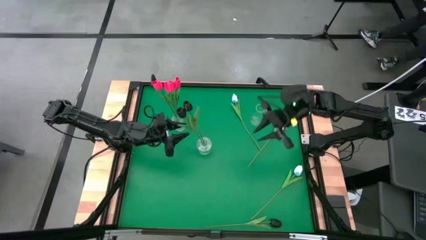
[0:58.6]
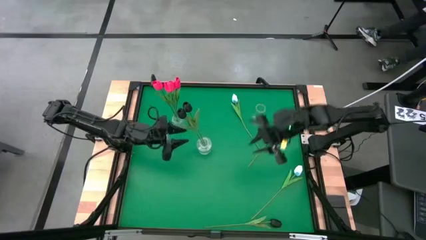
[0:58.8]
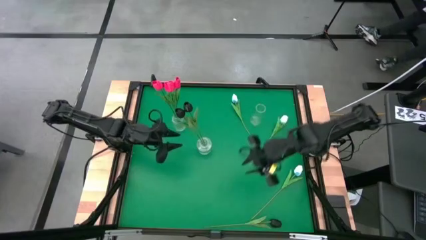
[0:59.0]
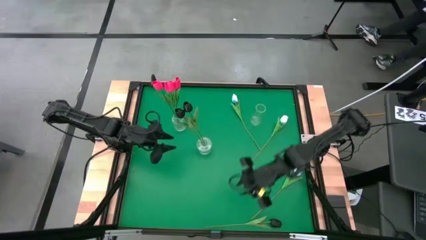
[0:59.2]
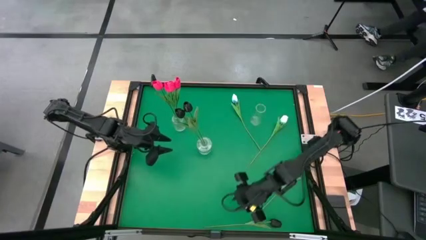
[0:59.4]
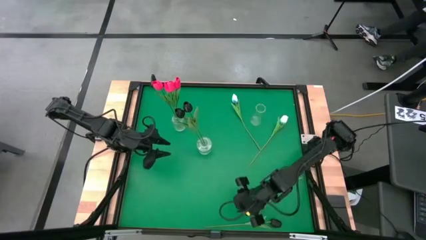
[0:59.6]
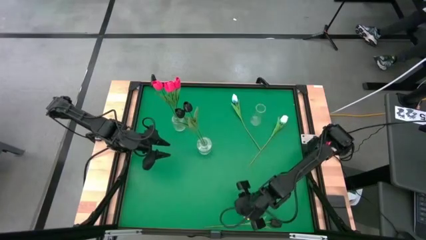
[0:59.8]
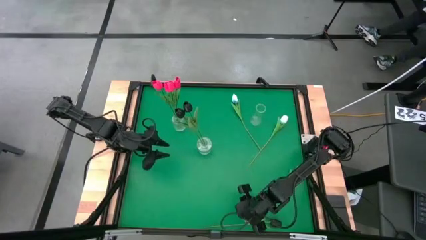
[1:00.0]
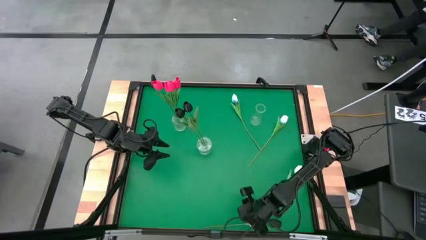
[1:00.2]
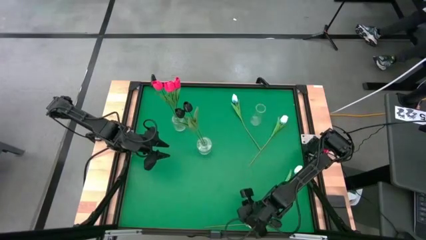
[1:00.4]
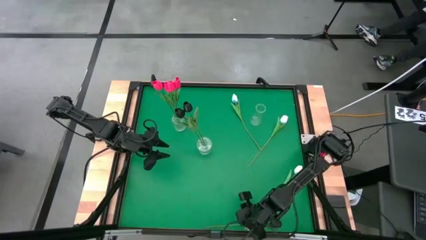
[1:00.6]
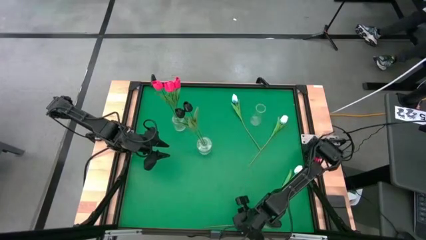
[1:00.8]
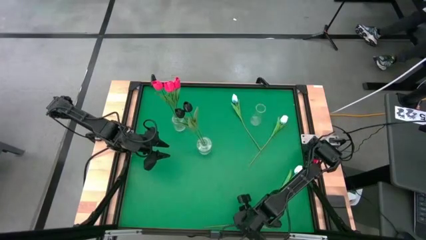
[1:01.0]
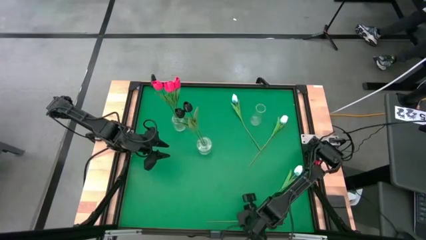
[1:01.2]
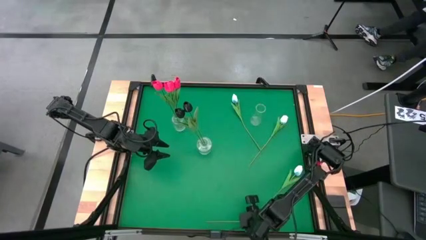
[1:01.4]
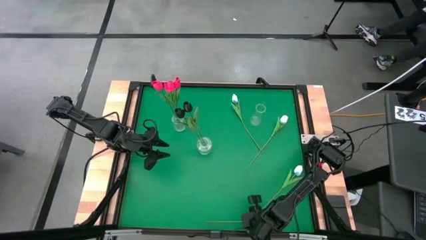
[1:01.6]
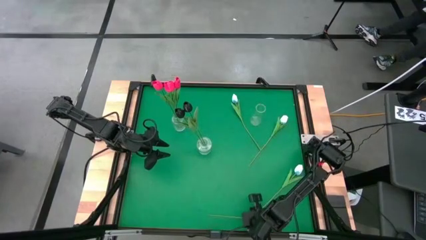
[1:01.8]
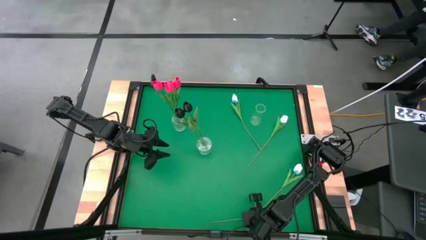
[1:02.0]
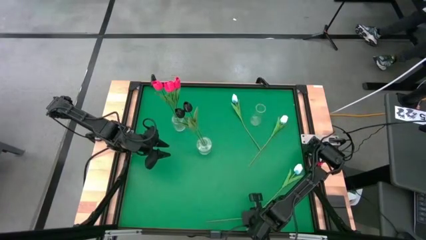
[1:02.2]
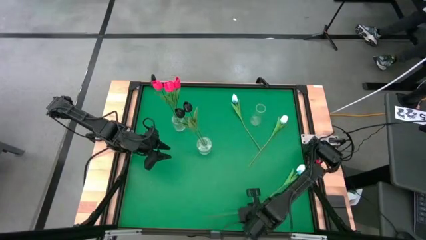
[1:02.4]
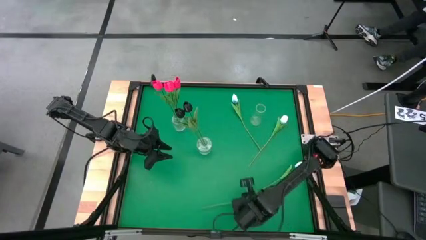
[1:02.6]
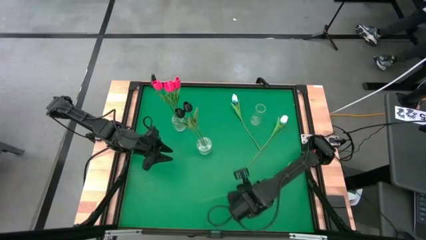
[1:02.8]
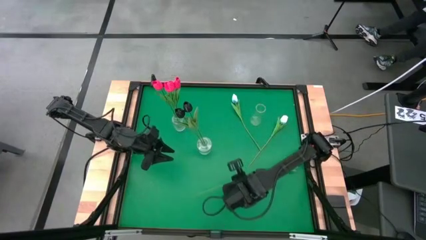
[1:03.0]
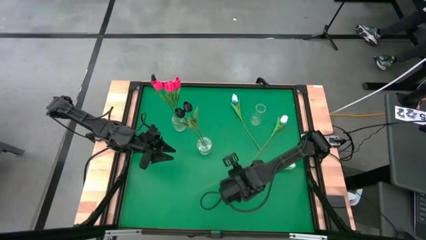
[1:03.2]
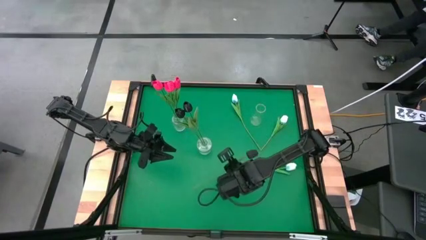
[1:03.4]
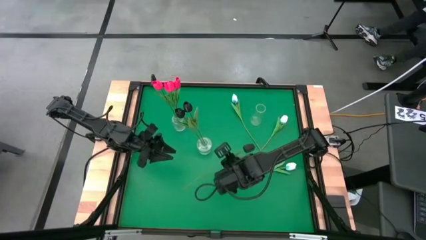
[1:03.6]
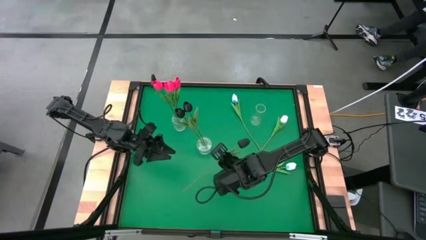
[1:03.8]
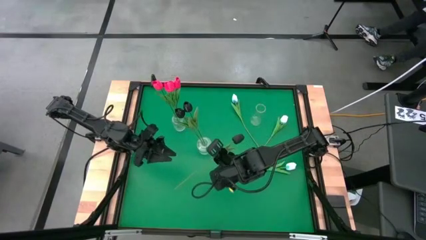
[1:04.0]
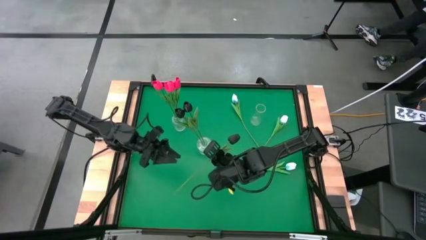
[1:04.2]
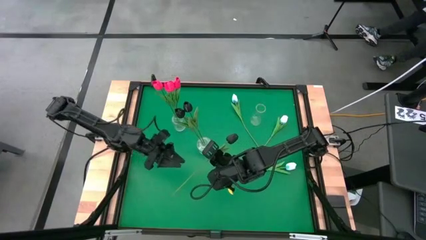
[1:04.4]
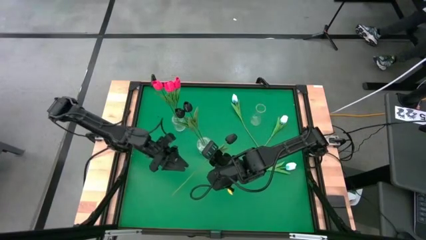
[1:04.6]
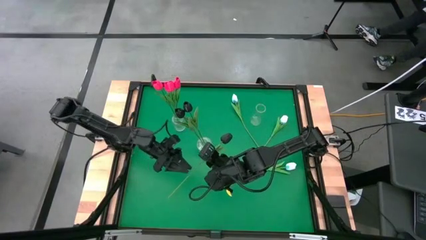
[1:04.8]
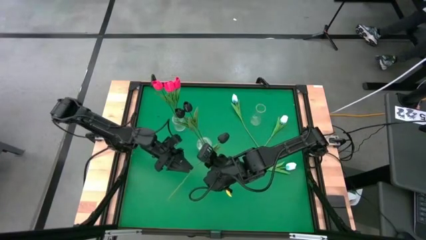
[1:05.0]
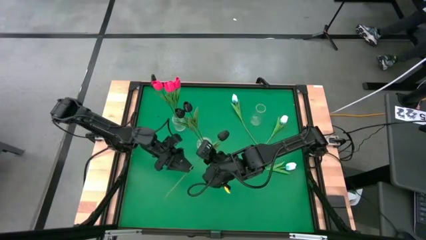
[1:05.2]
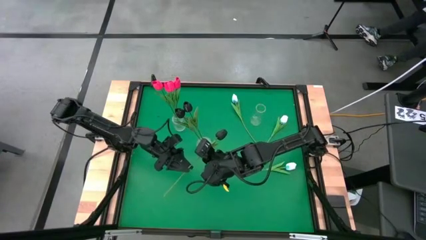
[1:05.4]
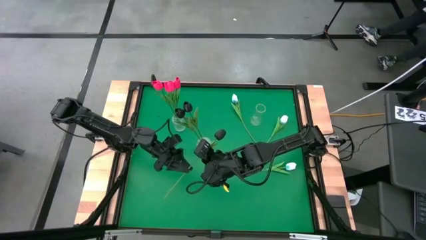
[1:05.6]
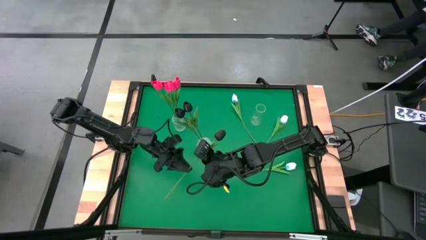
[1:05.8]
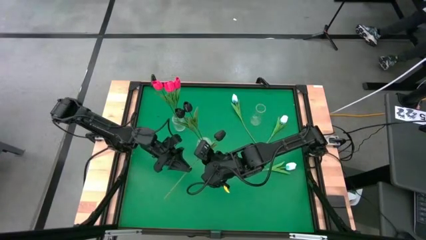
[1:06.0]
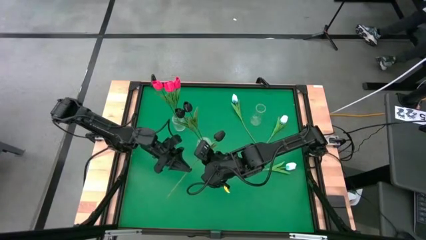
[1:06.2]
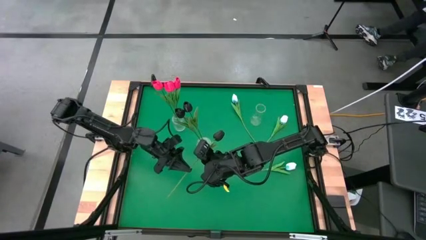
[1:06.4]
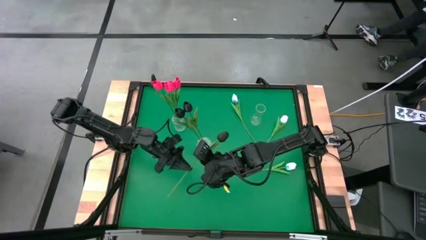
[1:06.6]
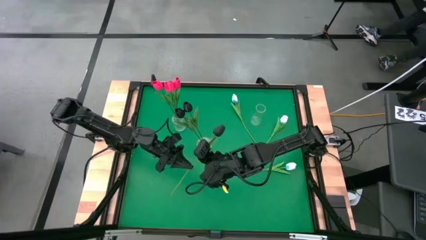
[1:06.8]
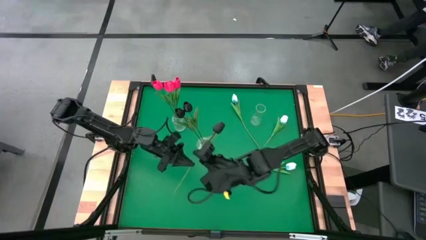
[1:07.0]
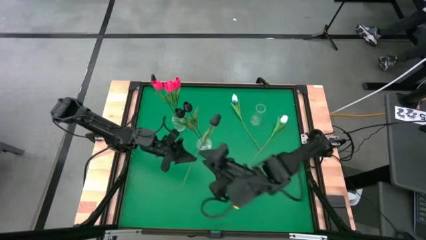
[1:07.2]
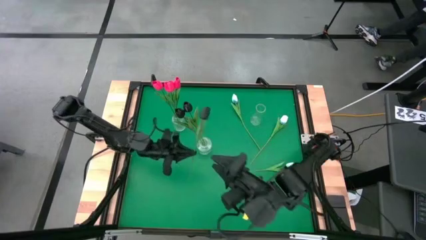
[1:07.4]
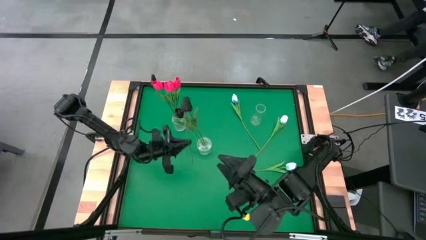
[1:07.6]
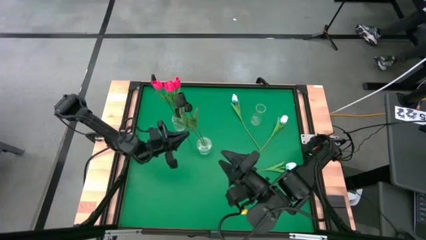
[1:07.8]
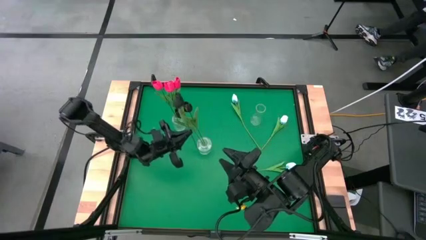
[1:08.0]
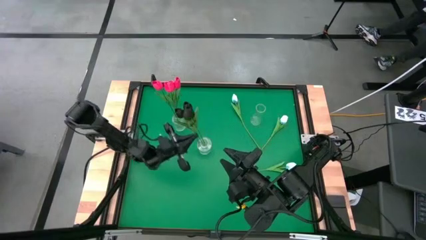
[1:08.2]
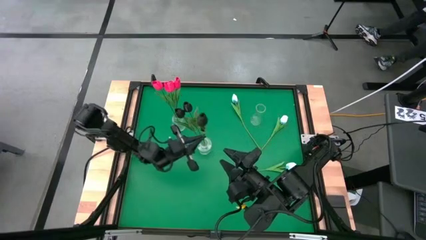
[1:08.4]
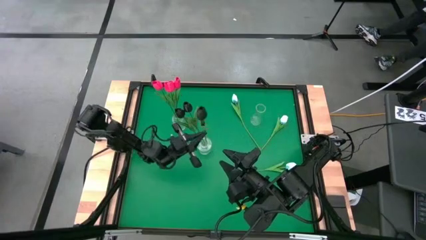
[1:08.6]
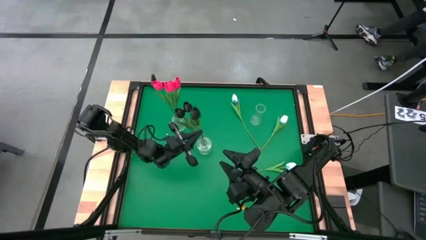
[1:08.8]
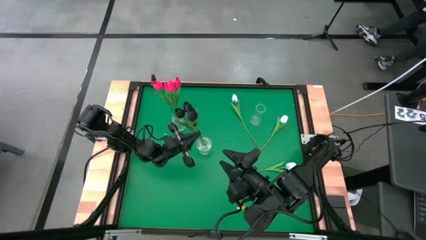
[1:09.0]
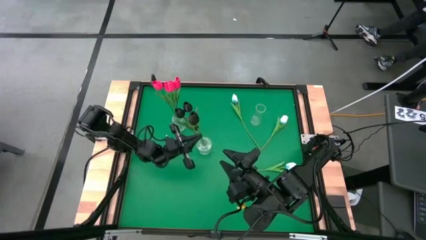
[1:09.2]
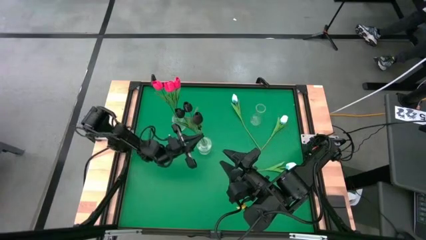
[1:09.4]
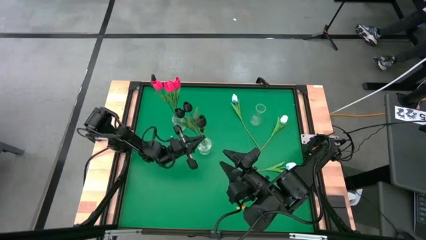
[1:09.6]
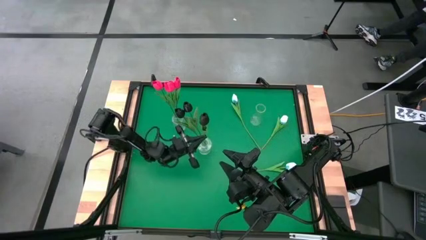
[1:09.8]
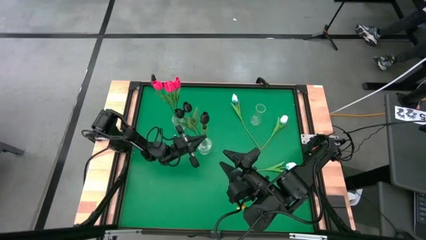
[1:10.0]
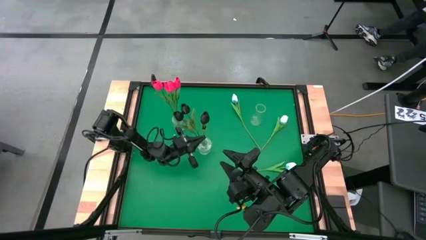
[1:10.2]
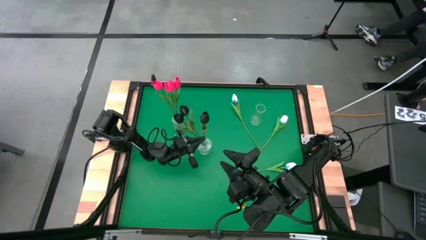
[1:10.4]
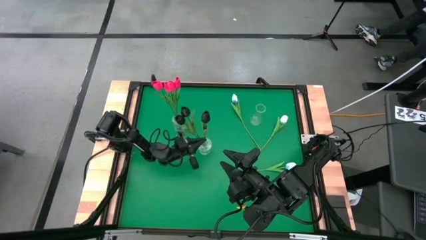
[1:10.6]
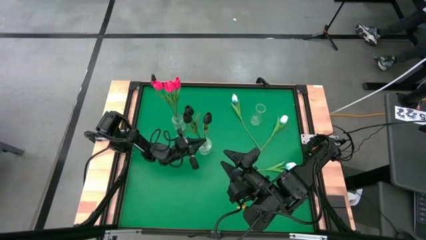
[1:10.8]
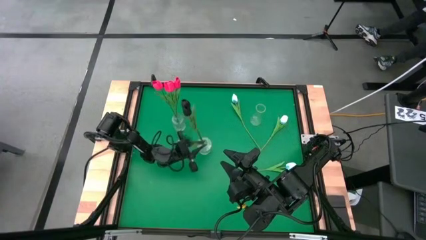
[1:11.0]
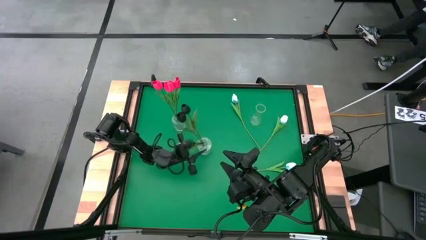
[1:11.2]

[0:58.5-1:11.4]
Task: Sort flowers into vase by color
Put the black tulip into the middle transparent vase
